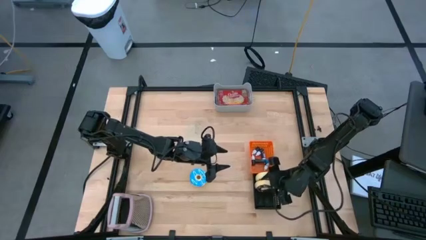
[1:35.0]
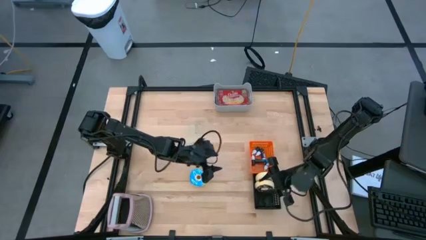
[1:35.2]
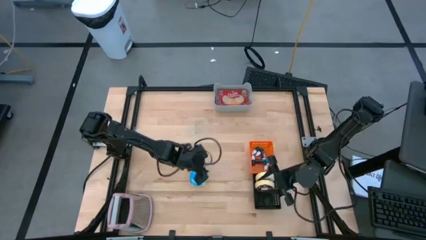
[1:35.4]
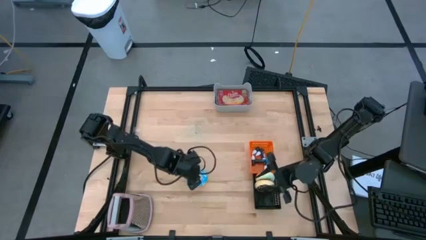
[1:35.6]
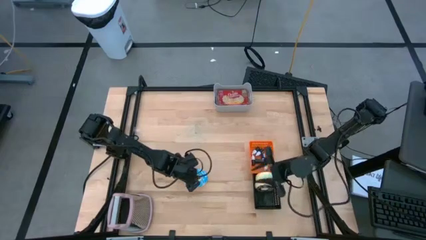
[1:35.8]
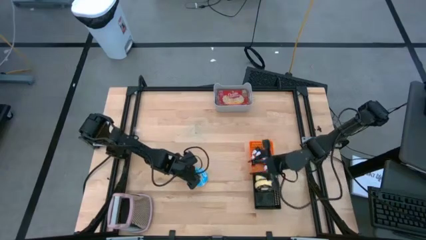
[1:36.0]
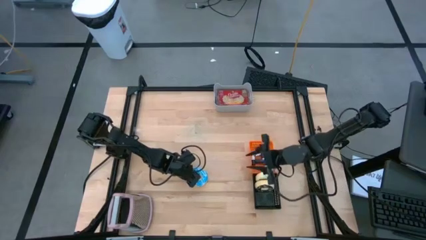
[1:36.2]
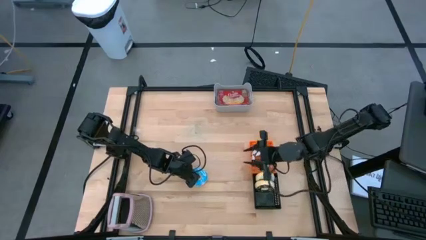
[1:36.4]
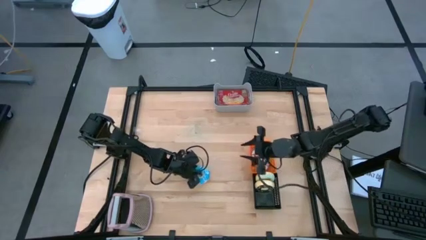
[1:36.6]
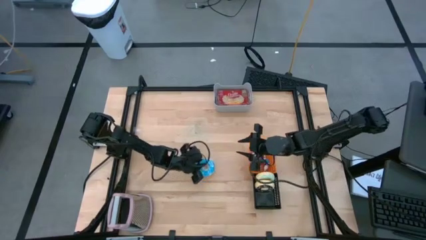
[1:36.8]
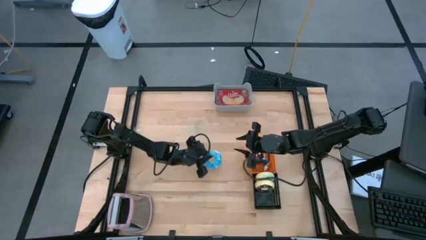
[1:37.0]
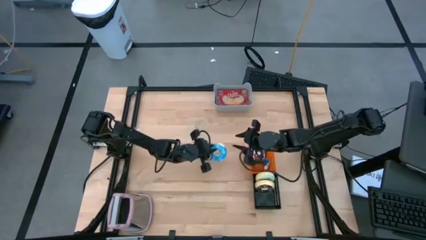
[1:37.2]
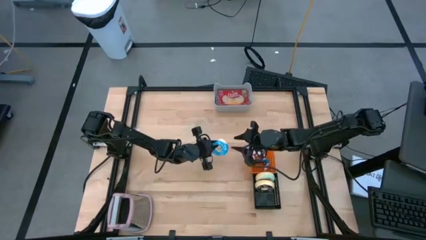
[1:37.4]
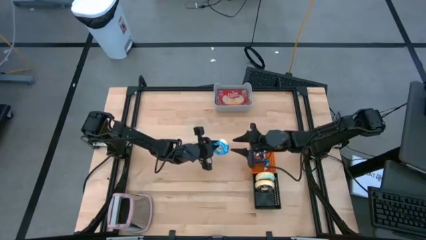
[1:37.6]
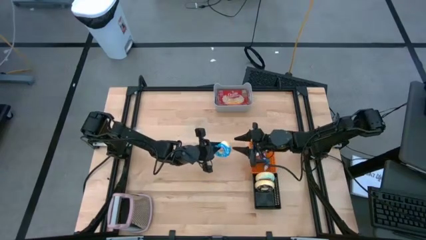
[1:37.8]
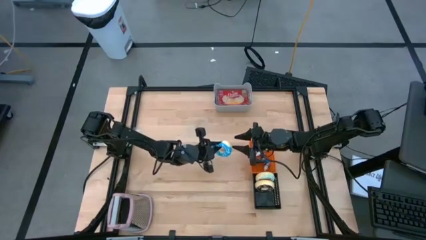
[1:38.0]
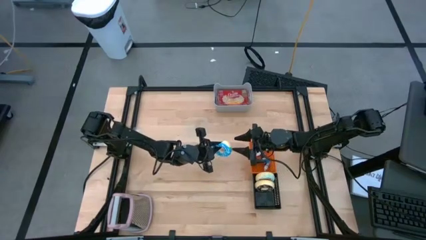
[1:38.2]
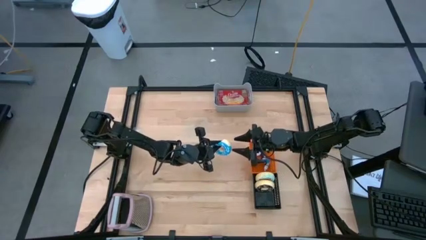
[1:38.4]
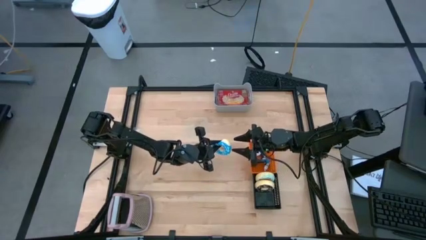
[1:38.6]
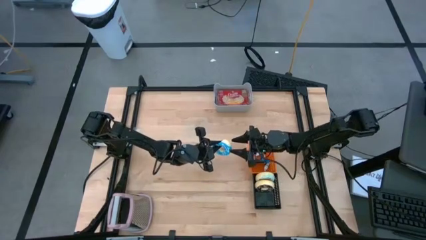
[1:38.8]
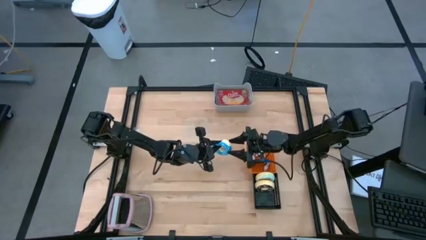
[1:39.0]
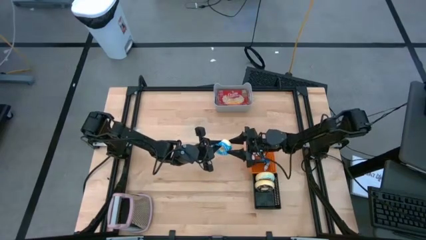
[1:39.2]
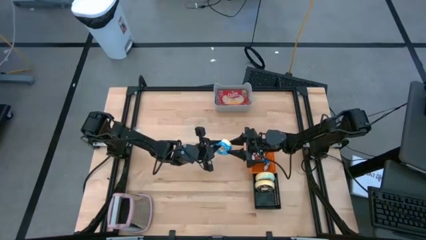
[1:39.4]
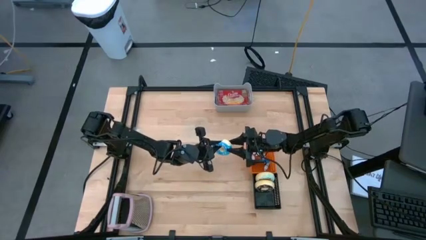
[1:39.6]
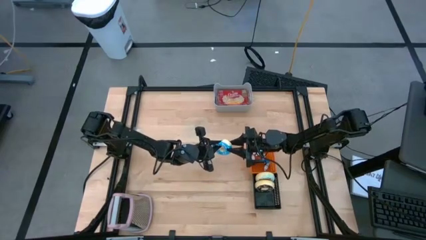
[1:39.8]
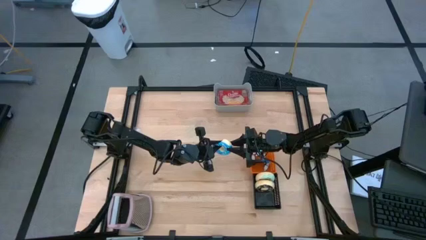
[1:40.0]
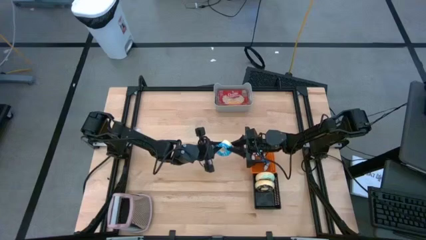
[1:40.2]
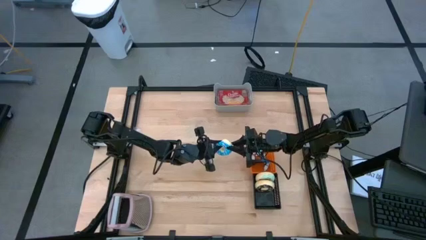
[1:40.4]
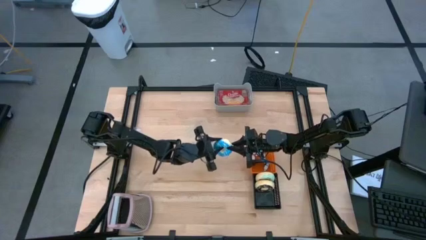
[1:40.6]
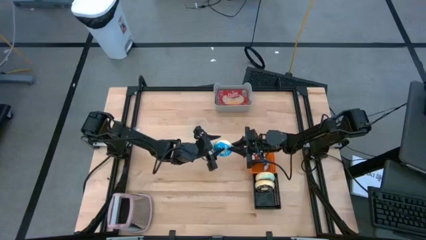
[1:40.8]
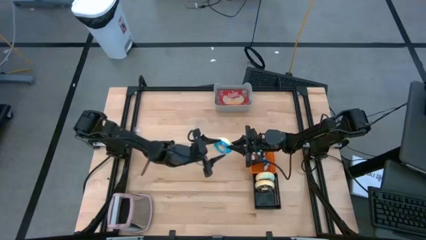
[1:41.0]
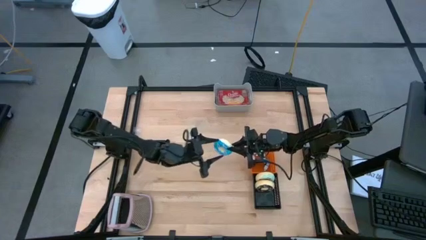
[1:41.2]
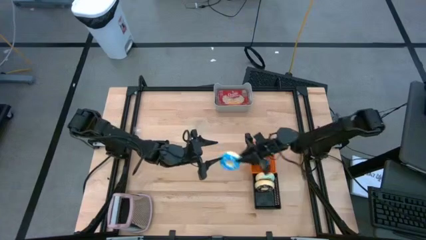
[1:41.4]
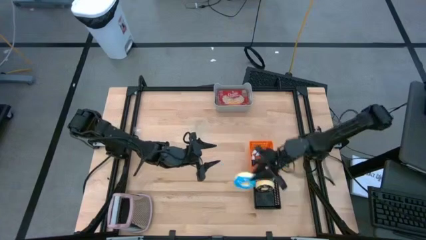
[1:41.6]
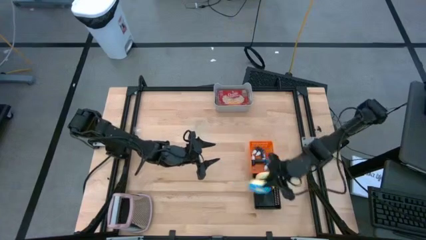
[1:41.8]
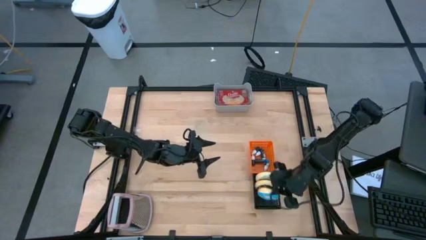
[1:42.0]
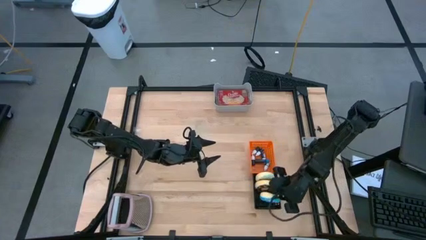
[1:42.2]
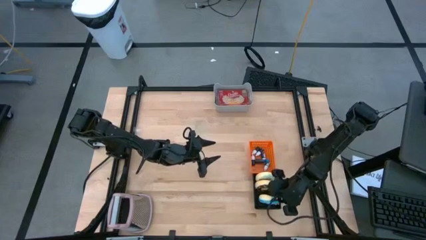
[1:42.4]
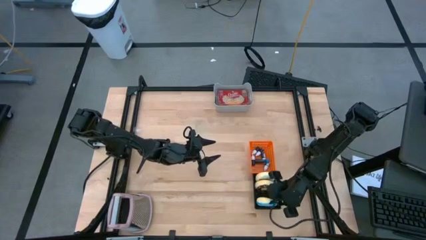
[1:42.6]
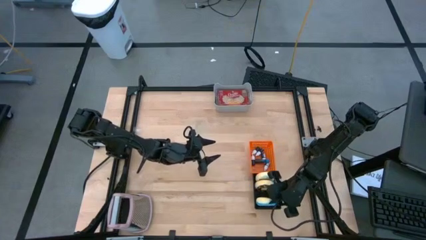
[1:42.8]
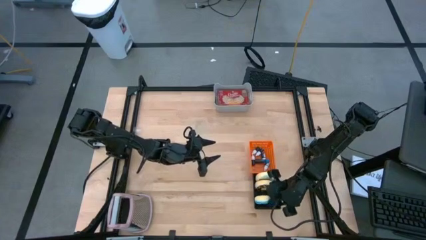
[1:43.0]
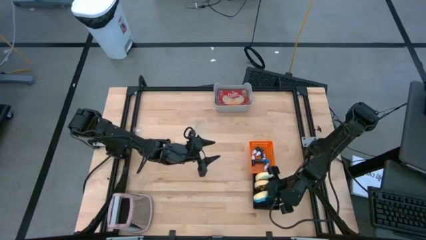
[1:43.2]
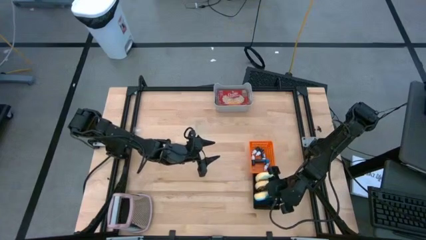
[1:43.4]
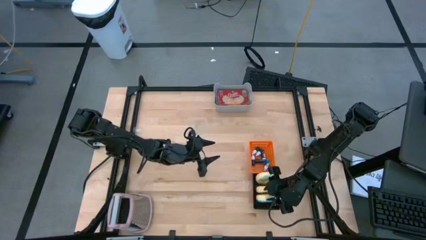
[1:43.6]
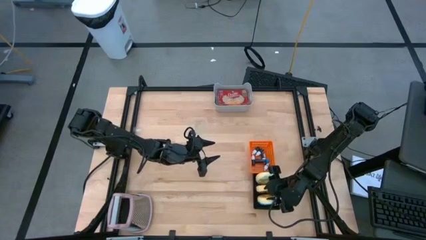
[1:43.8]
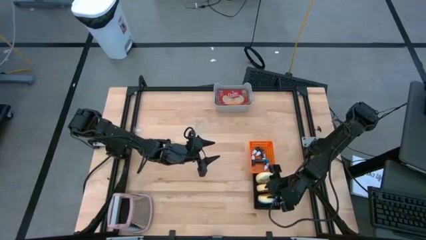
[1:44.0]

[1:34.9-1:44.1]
Put the blue donut into the black bin

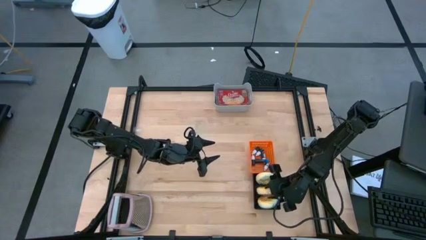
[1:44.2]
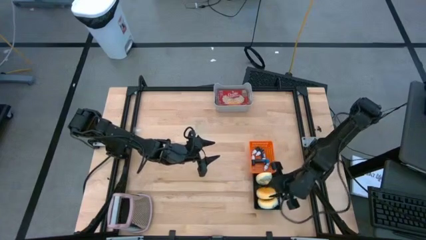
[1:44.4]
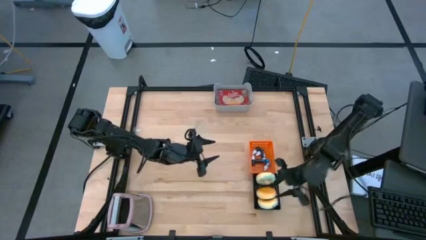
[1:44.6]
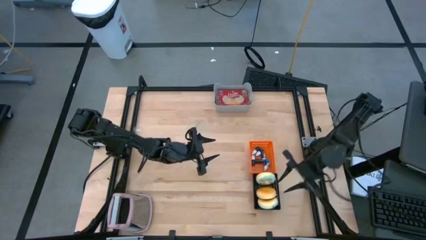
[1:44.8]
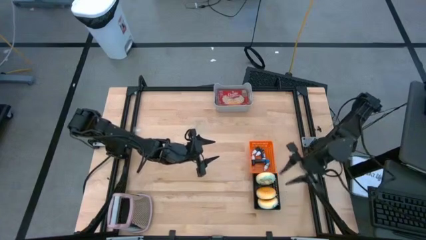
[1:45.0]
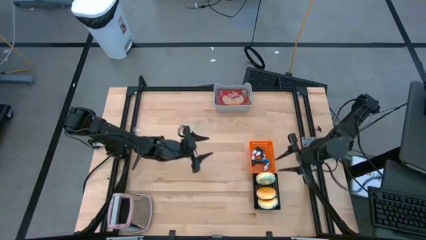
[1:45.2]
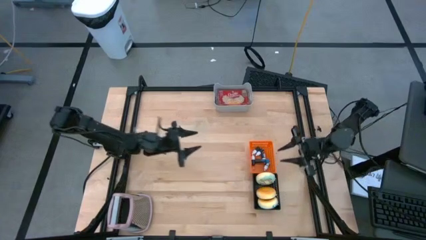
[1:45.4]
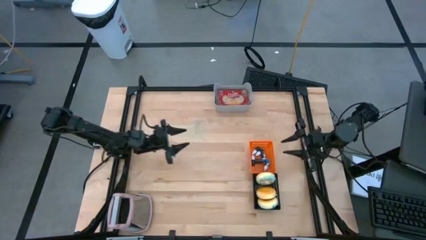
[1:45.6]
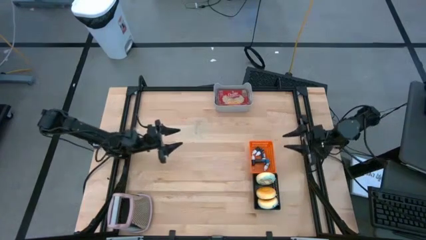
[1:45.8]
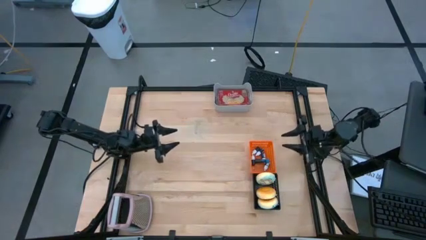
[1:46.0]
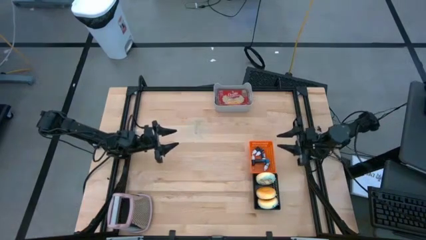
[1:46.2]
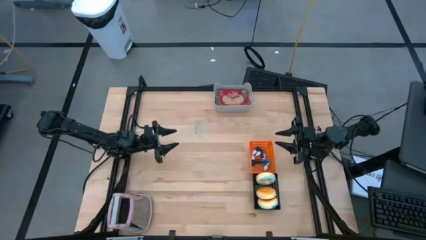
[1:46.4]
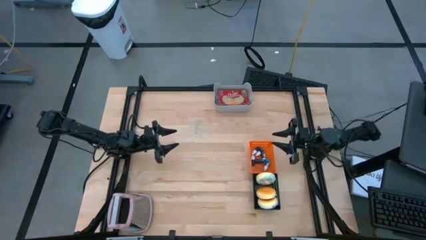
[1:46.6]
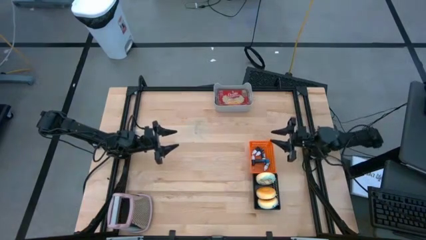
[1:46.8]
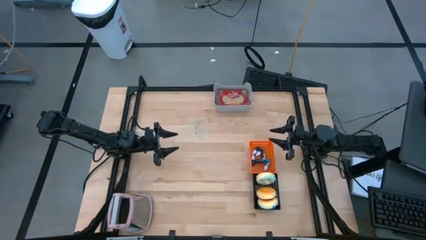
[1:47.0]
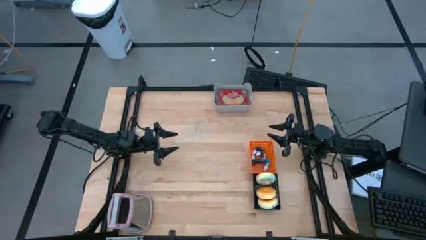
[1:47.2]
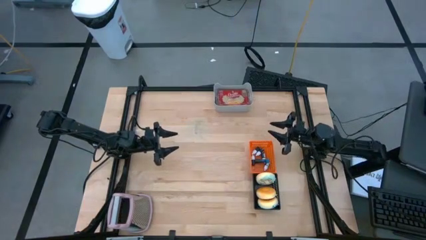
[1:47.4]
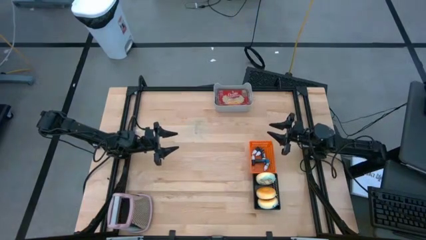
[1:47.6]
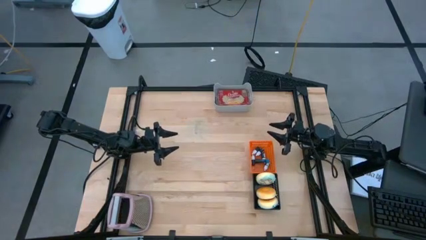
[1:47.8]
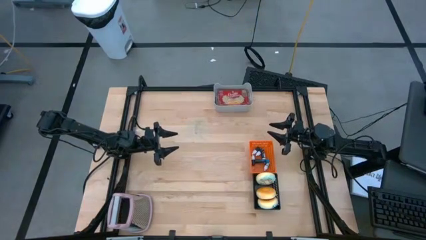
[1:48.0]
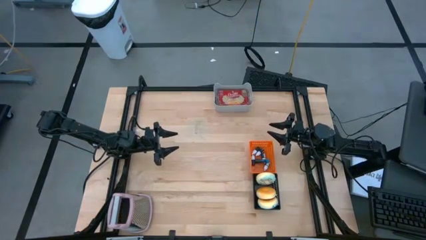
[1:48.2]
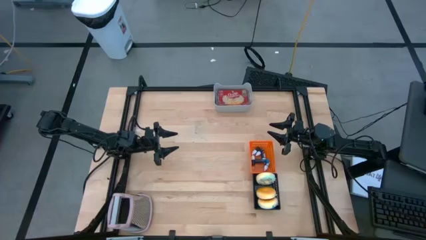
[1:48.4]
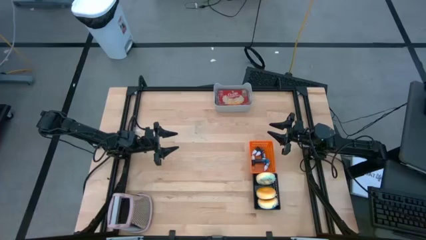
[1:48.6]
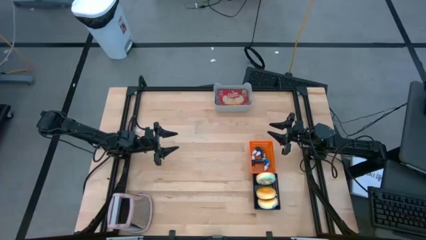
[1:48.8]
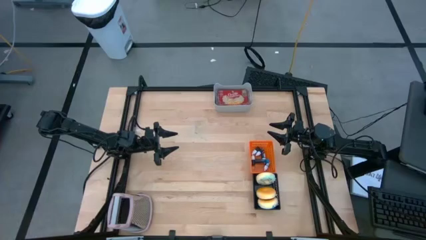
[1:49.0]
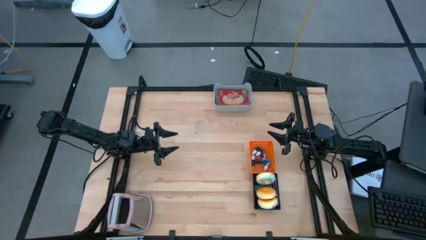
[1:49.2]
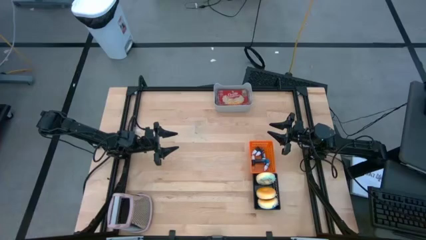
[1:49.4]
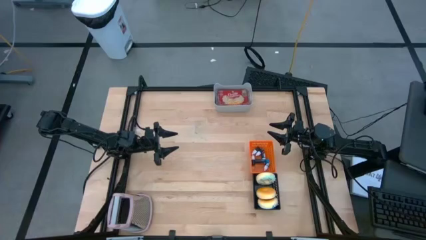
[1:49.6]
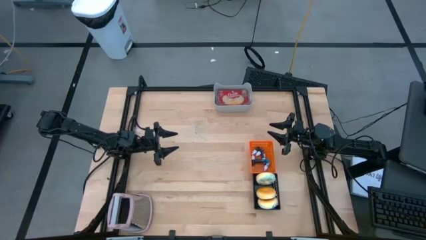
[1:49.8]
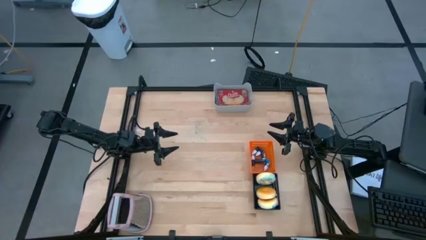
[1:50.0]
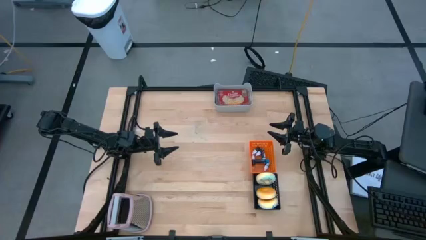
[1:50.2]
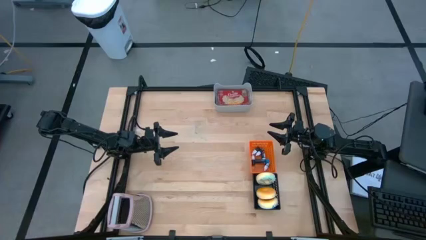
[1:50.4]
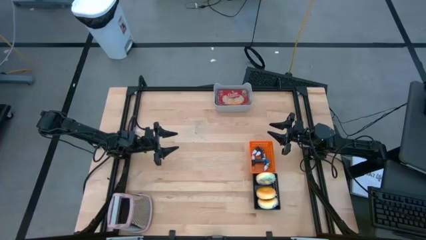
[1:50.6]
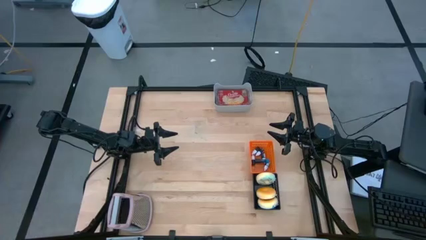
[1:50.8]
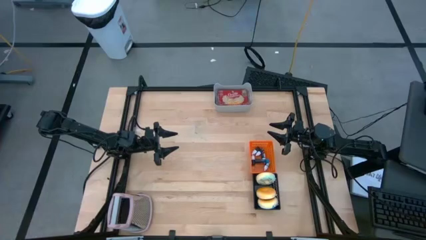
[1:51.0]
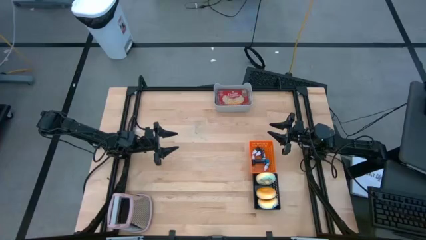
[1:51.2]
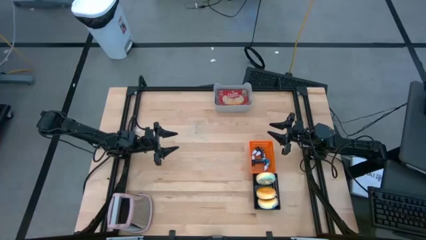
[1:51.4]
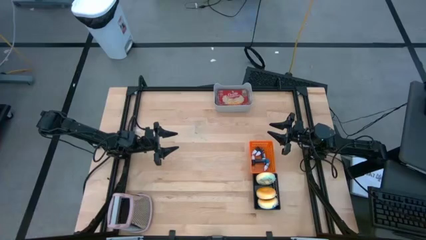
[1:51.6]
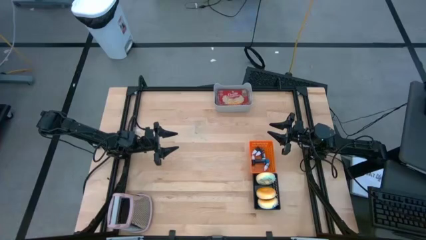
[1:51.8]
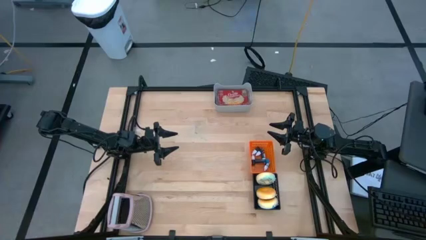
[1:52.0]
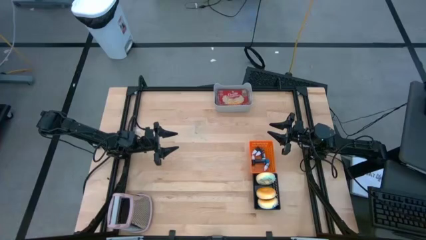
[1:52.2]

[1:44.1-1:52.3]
Return to Home Position
